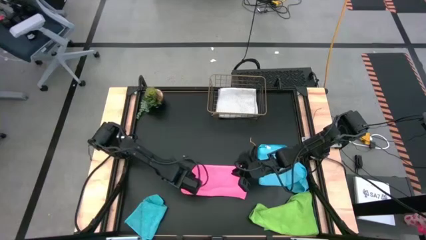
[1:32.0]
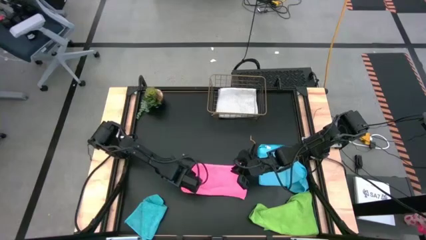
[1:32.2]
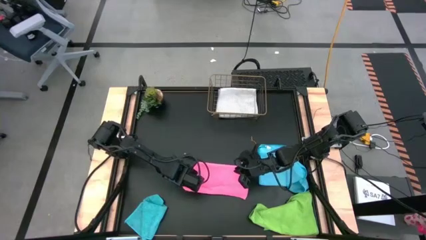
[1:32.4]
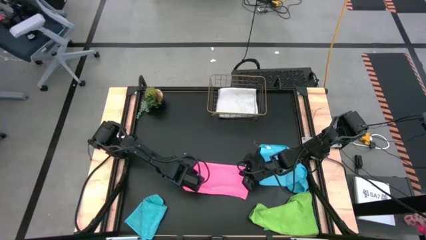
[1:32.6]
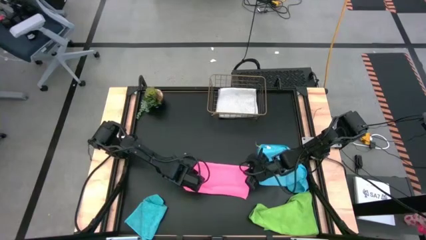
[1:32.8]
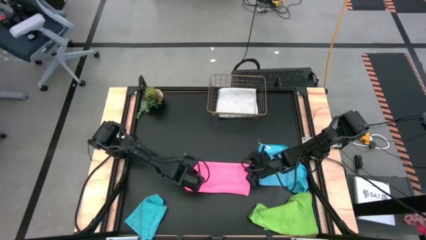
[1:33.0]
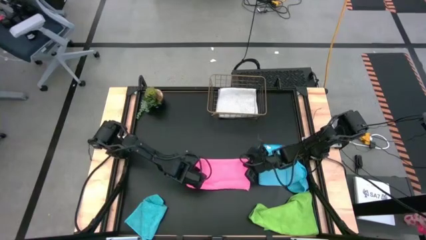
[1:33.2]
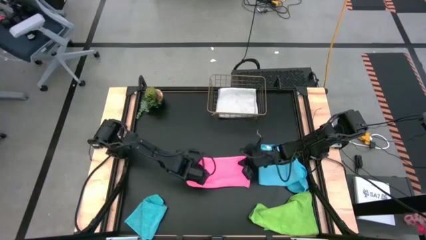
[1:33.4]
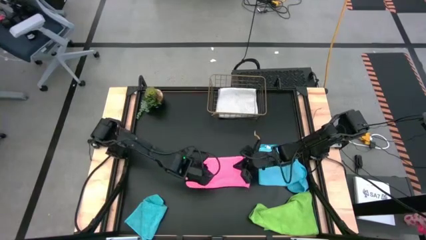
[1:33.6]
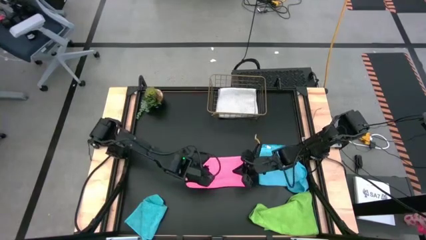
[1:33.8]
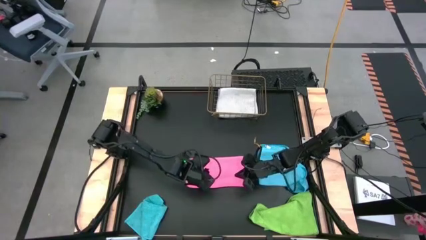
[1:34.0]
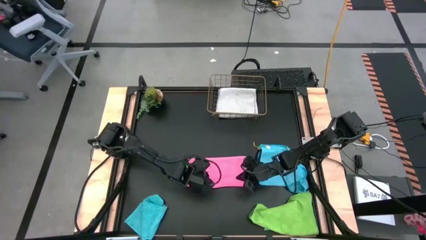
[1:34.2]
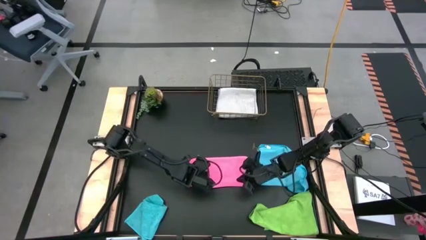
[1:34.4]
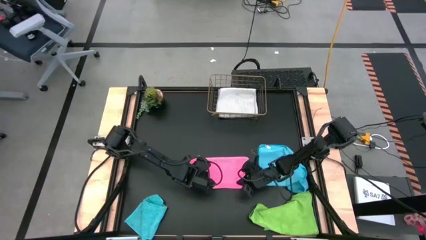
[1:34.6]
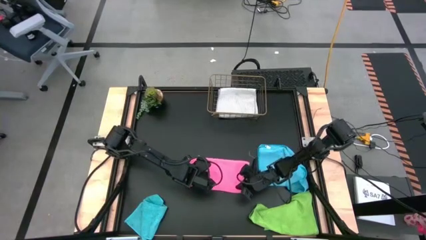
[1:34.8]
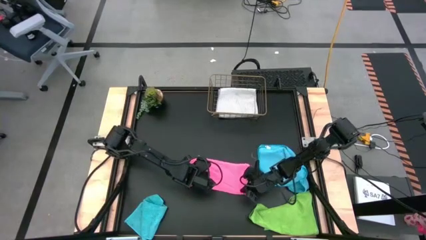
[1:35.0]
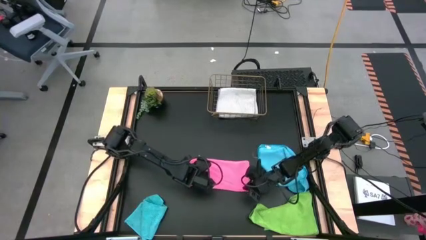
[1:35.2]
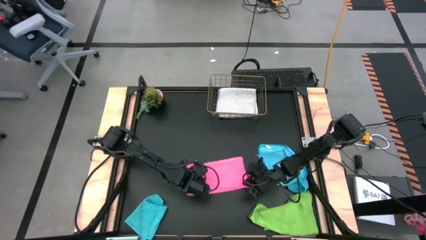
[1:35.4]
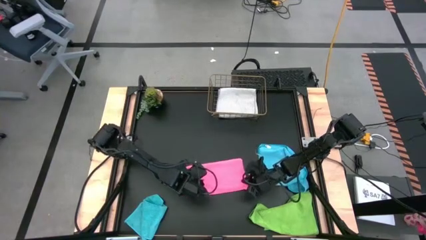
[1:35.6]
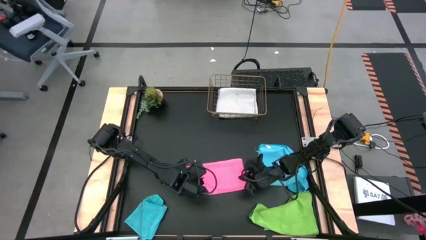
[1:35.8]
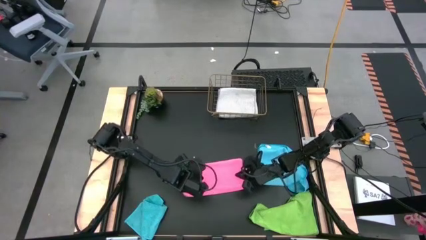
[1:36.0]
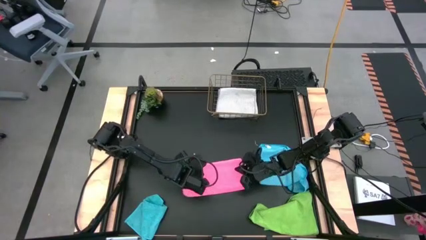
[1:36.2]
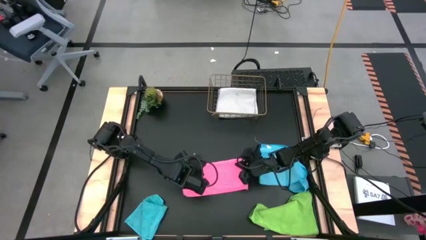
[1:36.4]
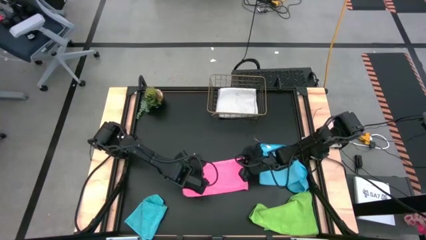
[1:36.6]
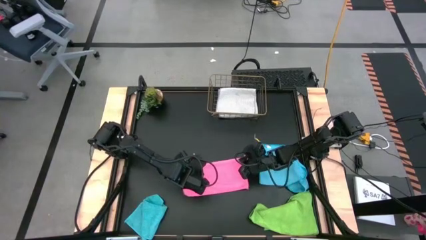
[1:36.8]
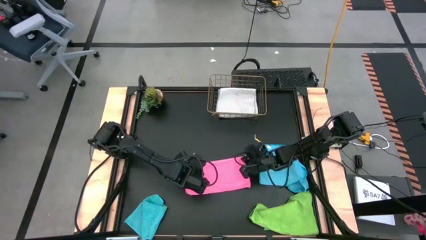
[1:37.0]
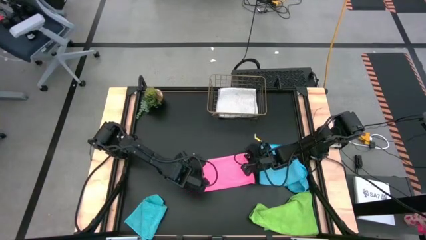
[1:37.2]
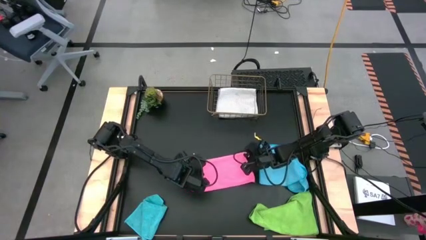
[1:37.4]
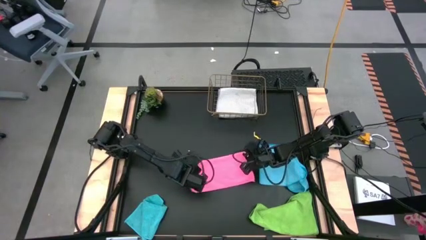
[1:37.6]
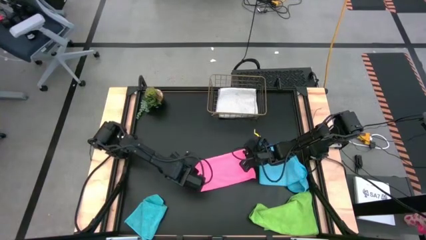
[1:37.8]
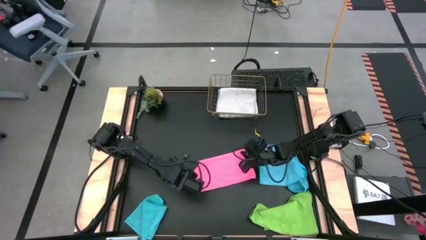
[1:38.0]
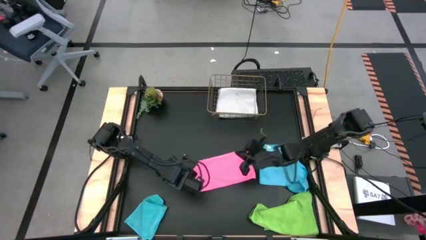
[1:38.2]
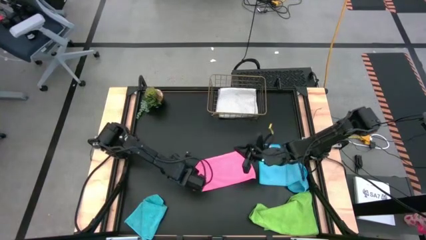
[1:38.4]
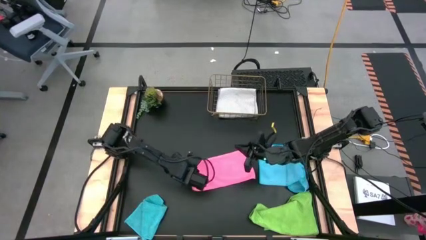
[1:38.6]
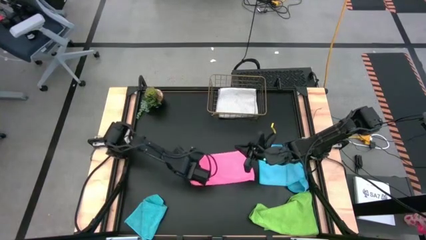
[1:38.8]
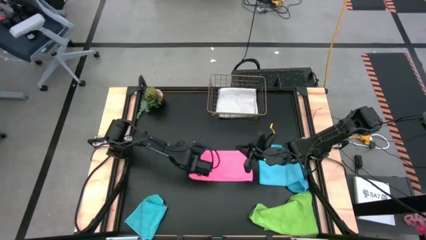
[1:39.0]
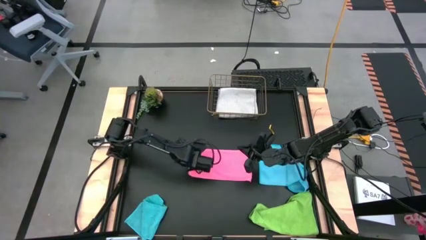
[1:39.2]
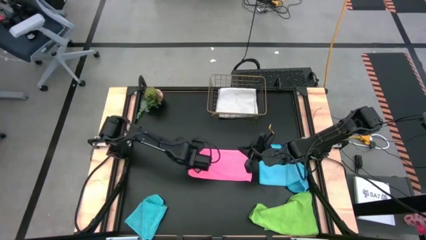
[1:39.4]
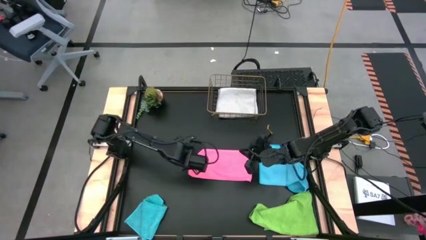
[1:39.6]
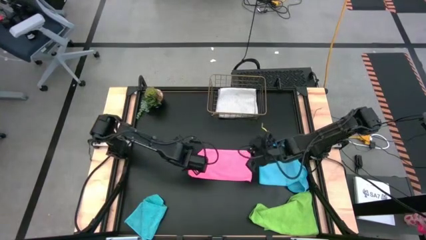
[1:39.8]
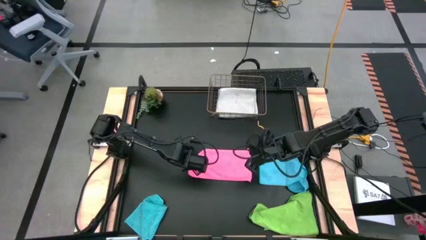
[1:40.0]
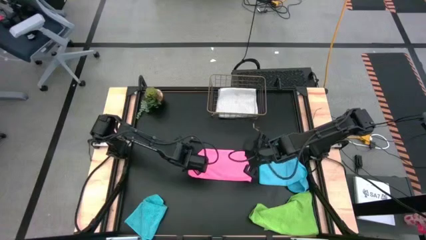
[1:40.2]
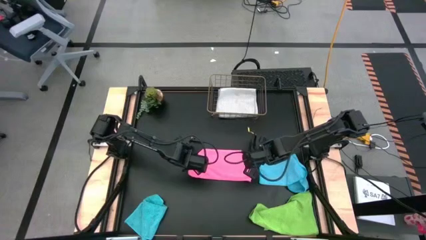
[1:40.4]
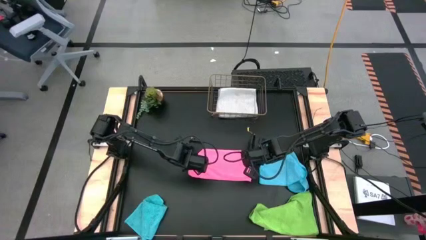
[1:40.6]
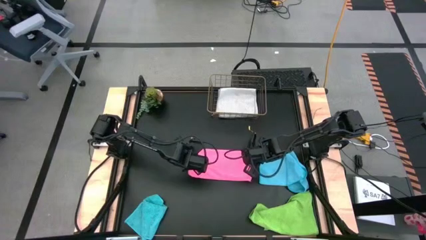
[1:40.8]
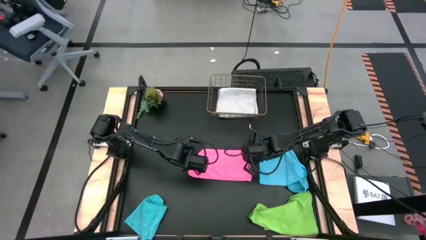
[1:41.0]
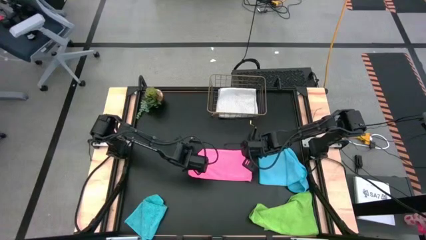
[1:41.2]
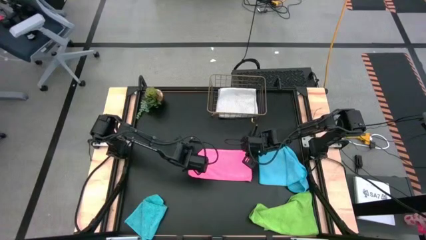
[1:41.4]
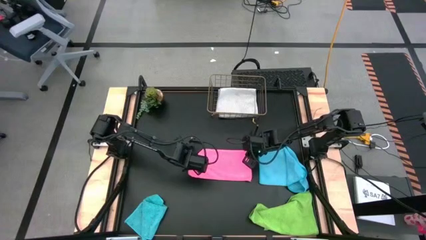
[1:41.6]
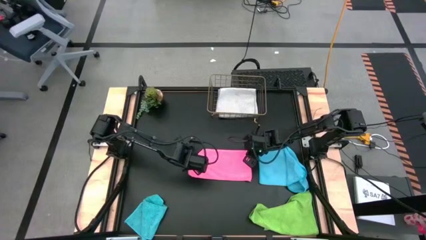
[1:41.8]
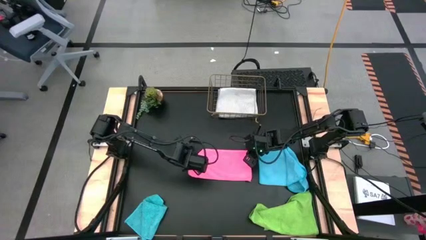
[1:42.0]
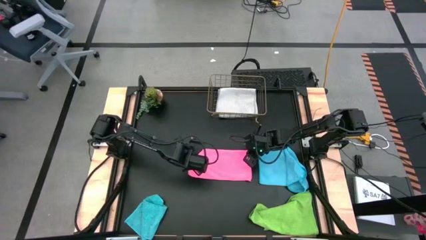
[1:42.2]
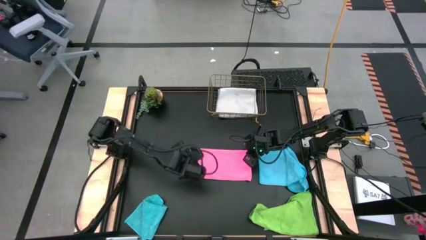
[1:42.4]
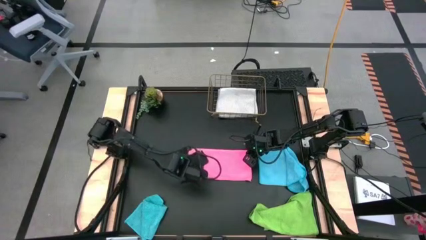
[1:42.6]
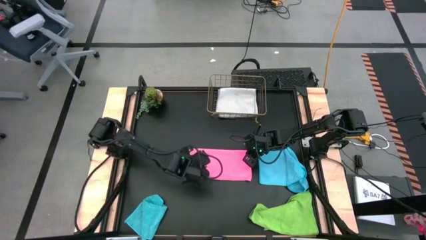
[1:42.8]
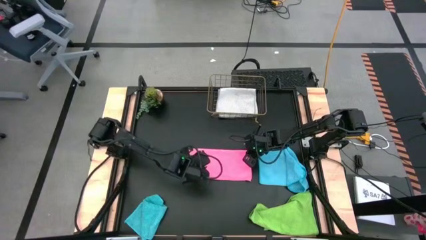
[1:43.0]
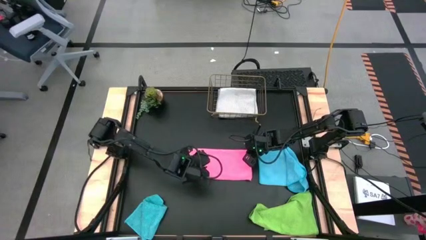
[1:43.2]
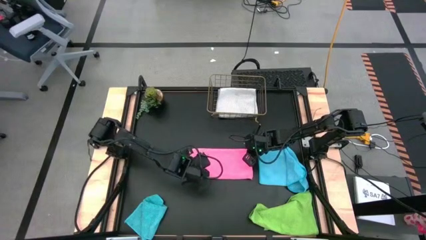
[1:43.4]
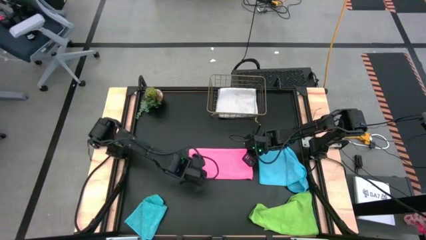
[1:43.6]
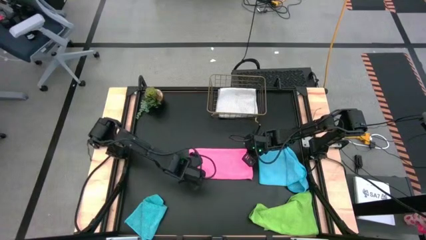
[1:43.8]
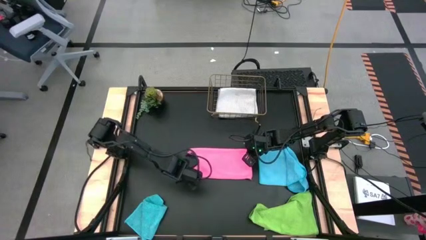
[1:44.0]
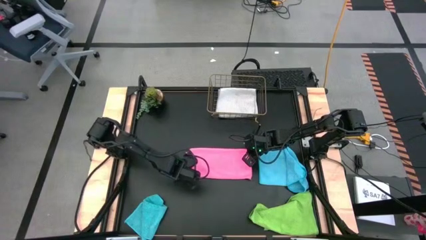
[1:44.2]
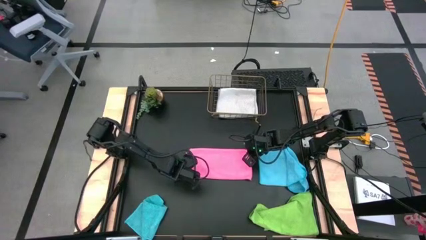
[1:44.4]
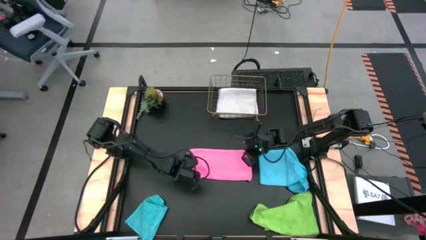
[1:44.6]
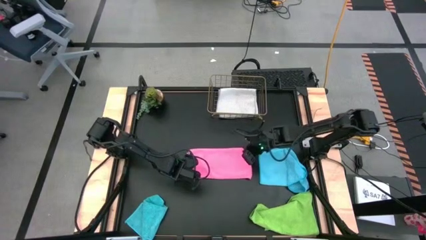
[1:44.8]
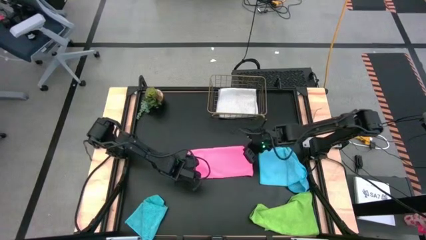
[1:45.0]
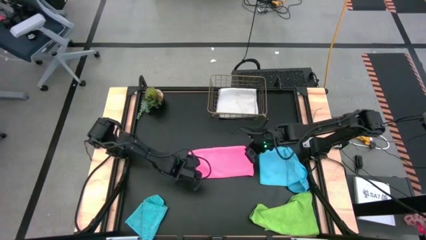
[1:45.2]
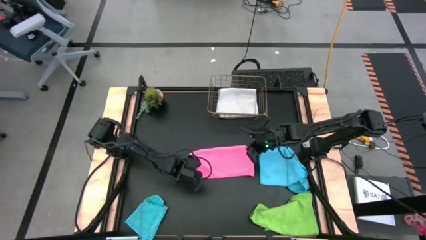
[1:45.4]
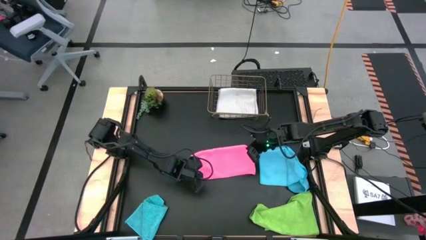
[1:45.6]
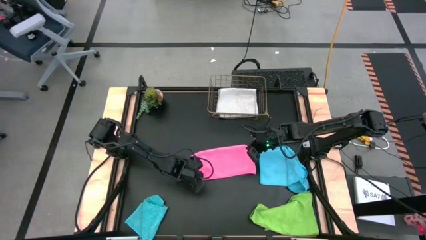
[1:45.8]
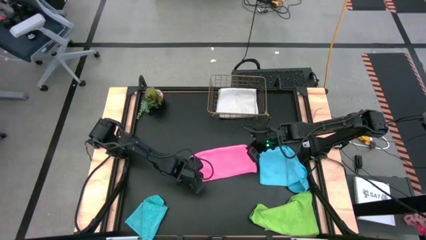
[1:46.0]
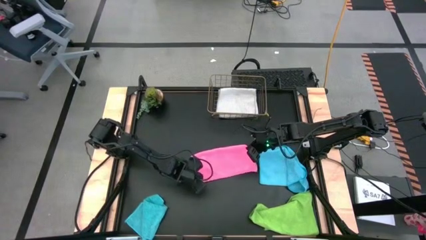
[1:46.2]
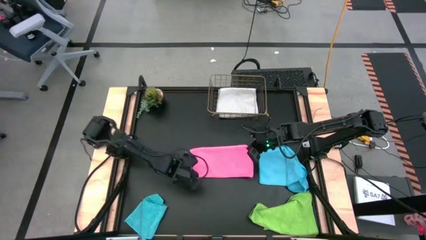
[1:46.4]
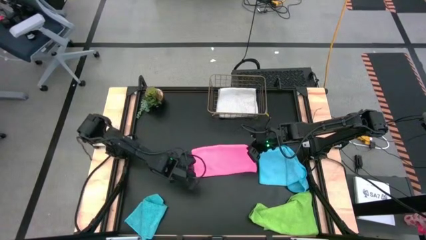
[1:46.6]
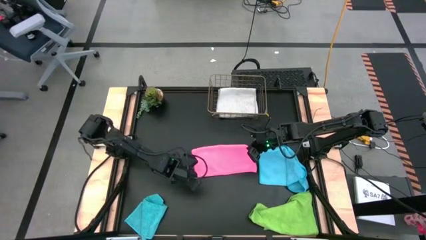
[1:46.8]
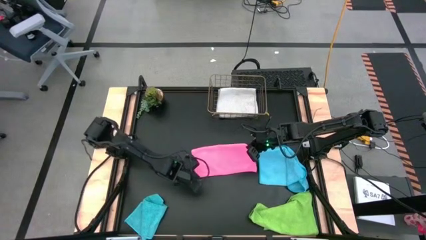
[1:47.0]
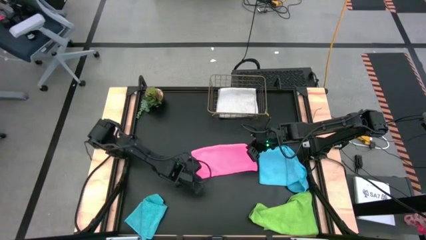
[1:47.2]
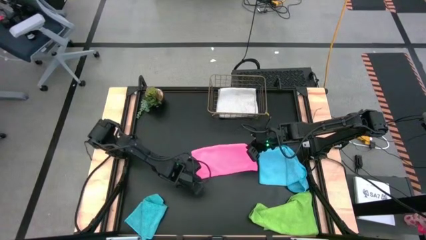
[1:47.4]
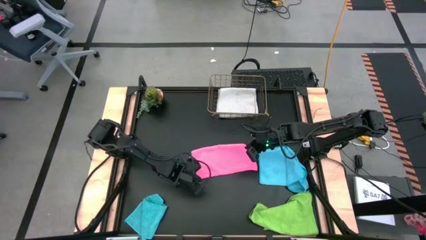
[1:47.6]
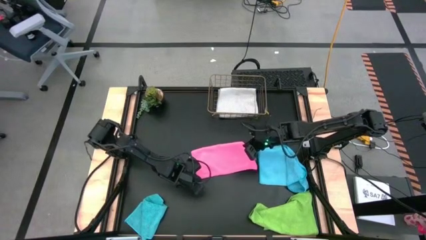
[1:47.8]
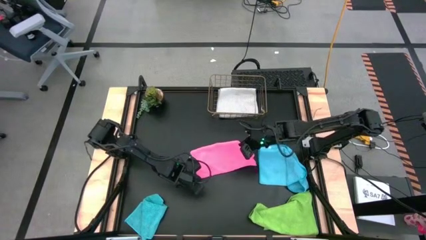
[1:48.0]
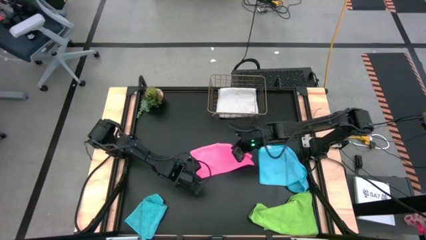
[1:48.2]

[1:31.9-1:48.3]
Task: Fold microfiber towels
Fold the pink towel
